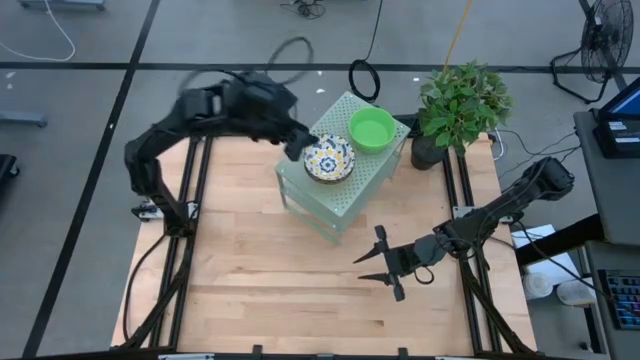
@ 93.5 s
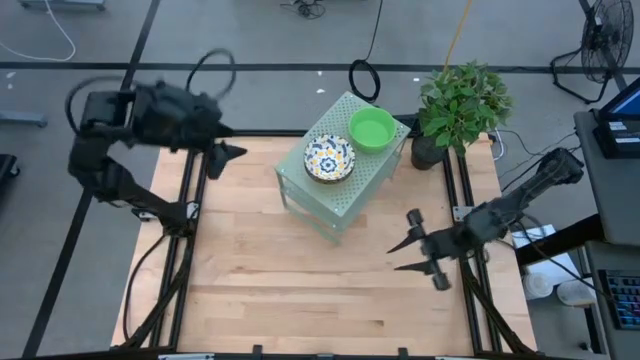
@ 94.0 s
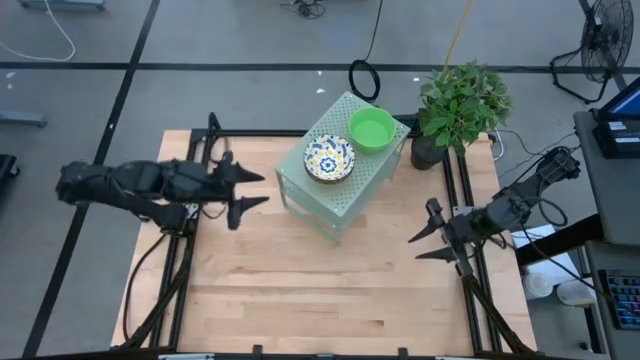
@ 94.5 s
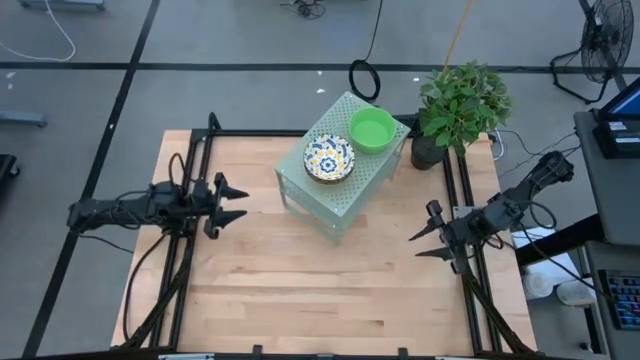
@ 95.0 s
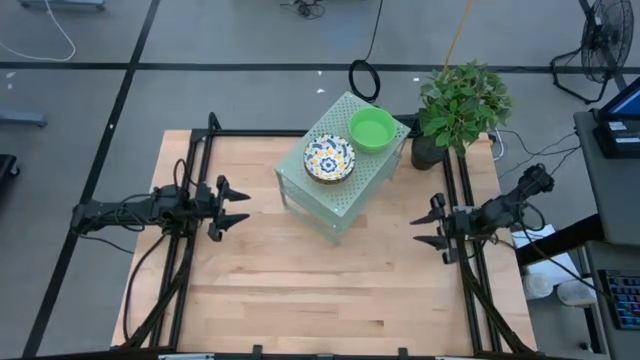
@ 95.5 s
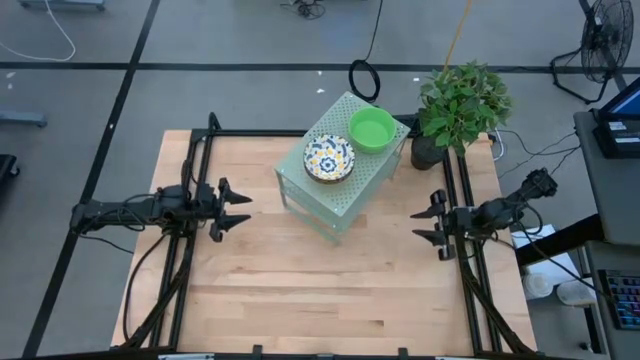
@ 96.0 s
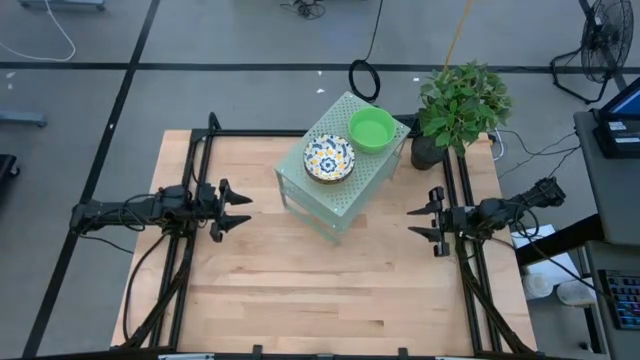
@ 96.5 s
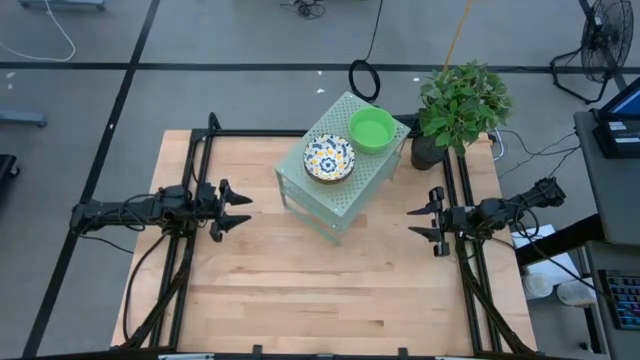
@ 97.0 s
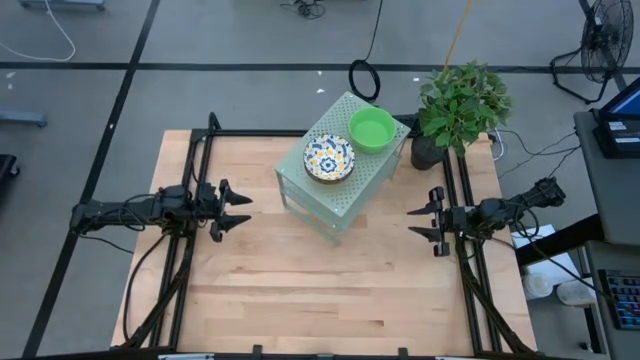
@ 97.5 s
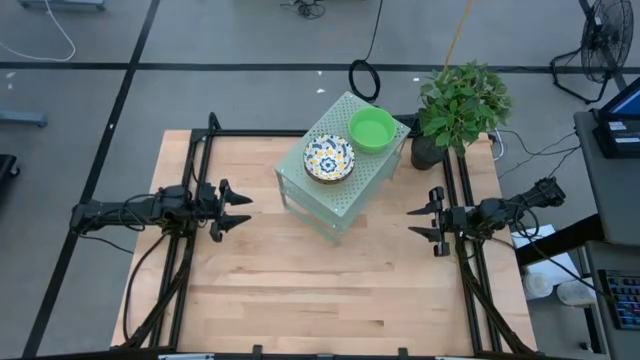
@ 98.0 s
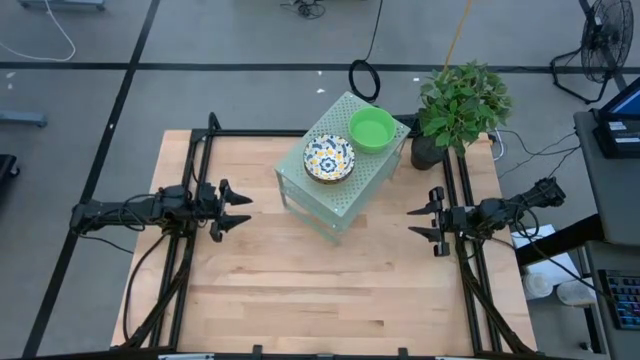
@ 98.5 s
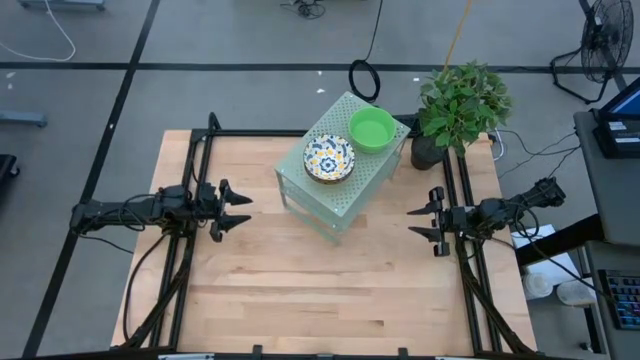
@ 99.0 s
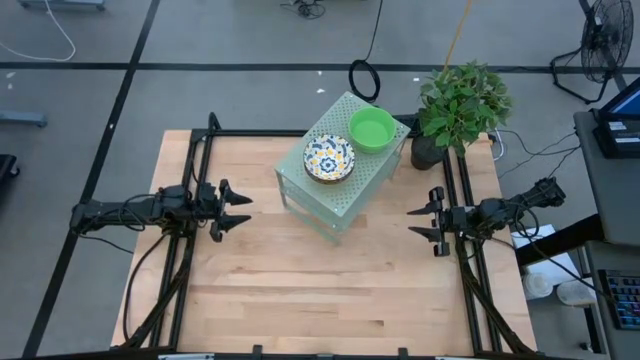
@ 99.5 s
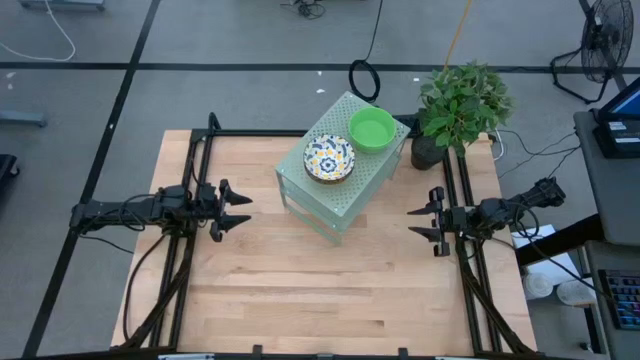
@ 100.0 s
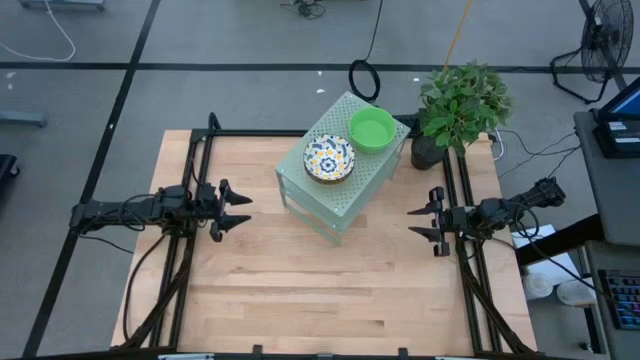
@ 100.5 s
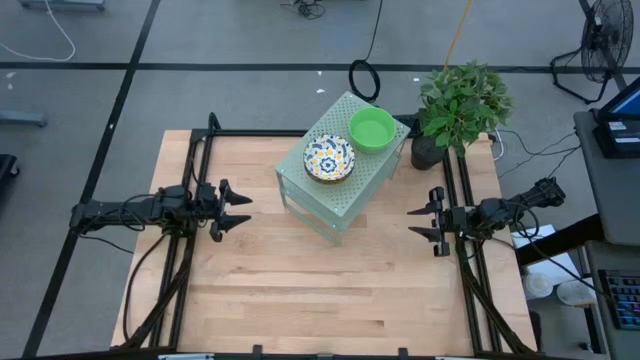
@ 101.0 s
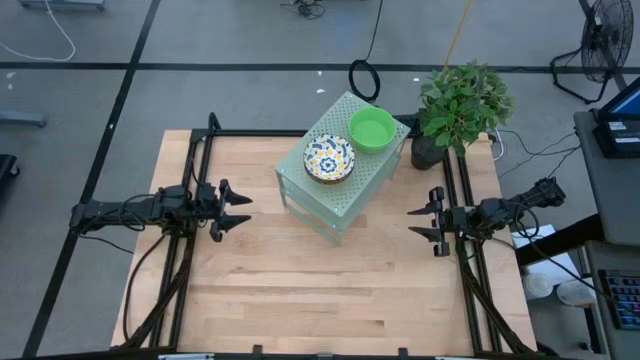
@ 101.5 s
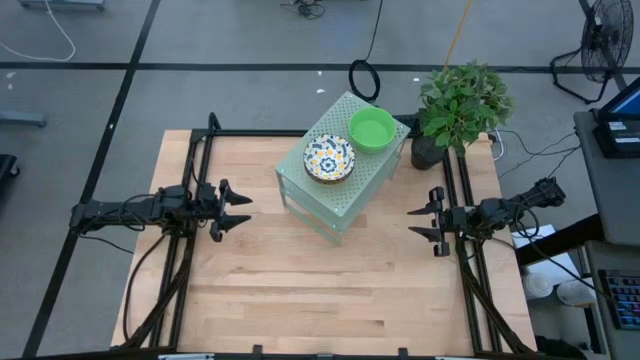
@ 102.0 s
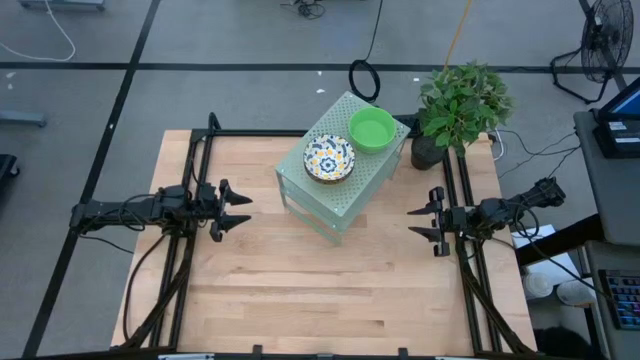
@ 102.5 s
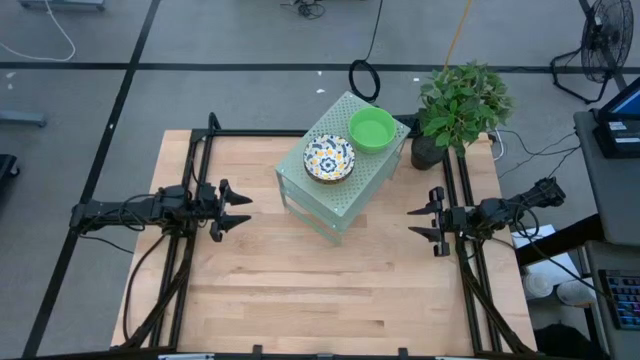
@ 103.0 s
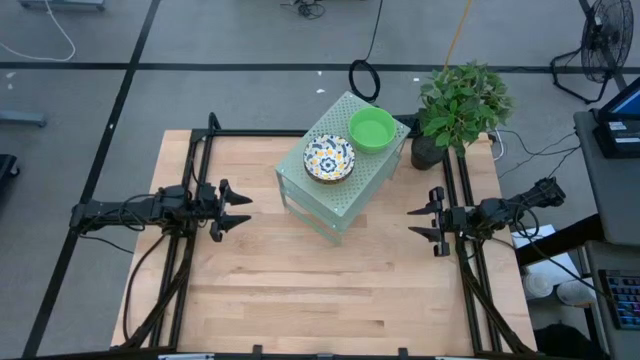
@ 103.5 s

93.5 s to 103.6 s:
Task: Pick & Place Mini bowls
Return to Home Position

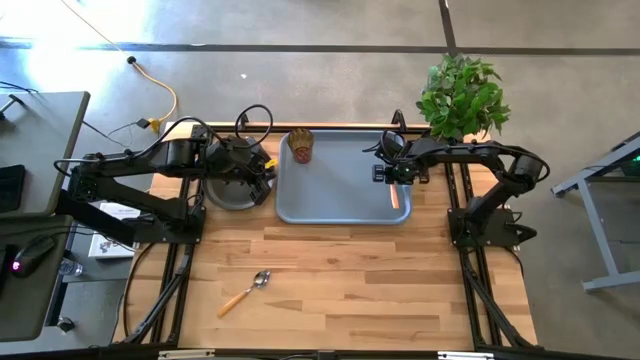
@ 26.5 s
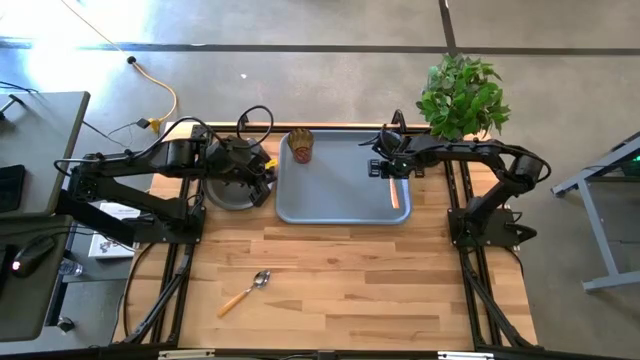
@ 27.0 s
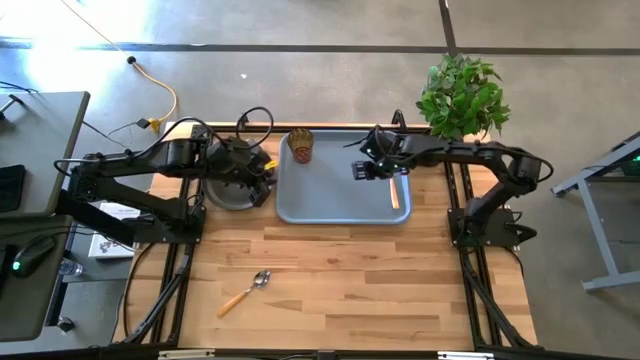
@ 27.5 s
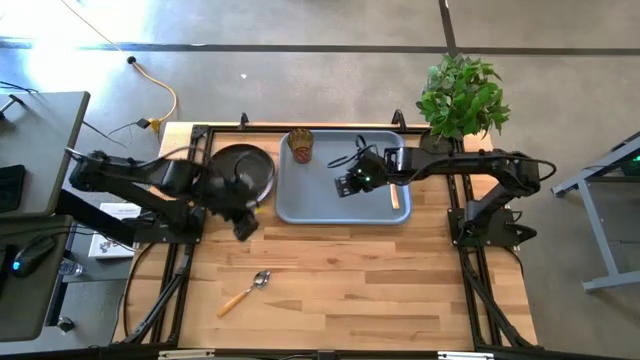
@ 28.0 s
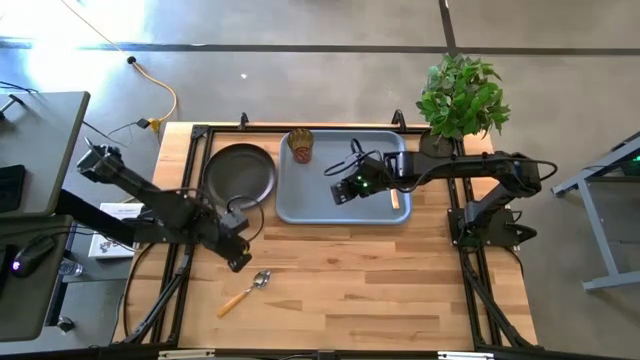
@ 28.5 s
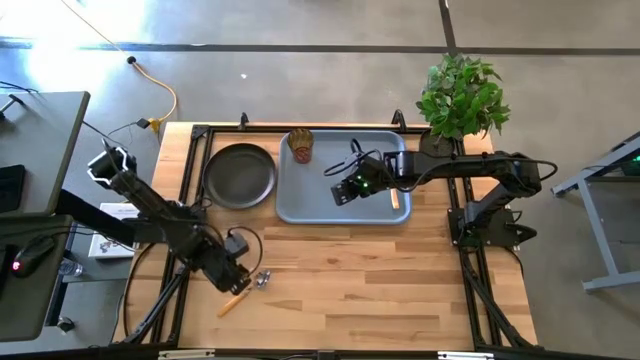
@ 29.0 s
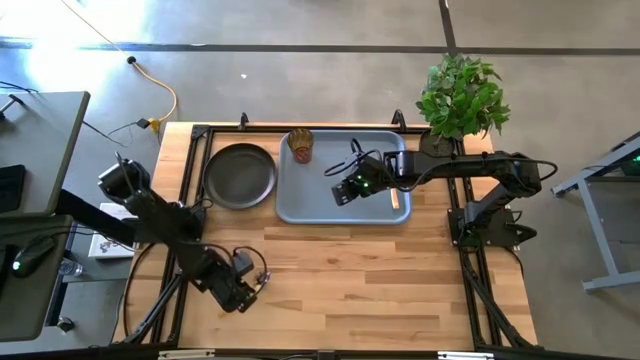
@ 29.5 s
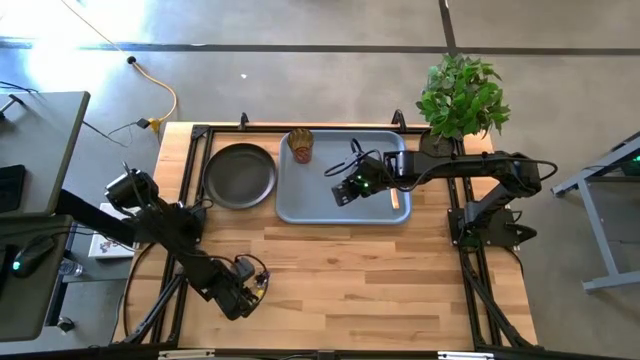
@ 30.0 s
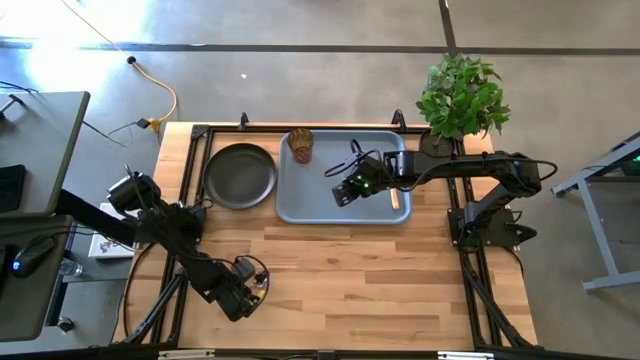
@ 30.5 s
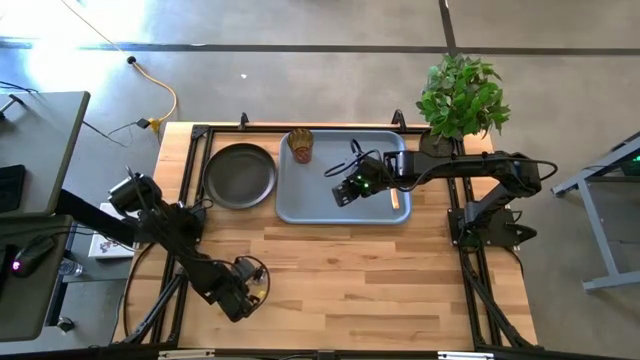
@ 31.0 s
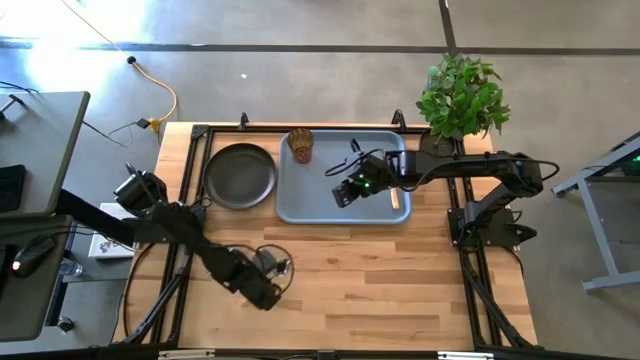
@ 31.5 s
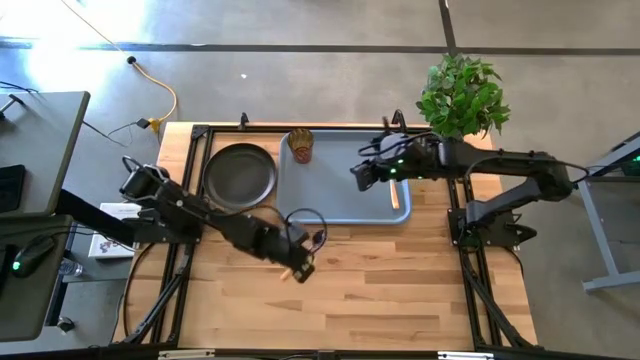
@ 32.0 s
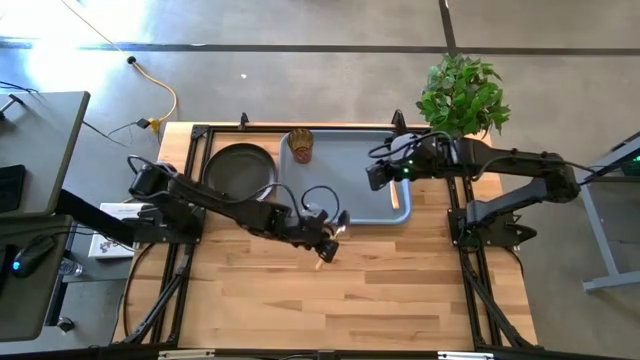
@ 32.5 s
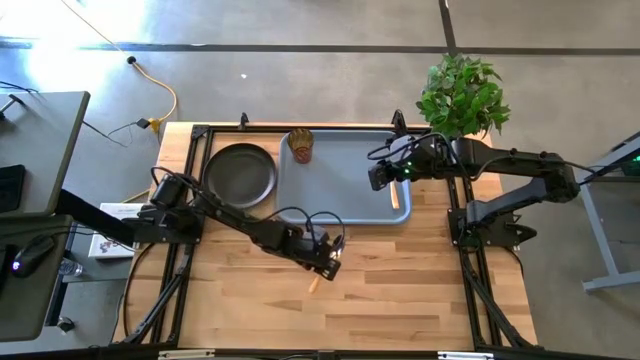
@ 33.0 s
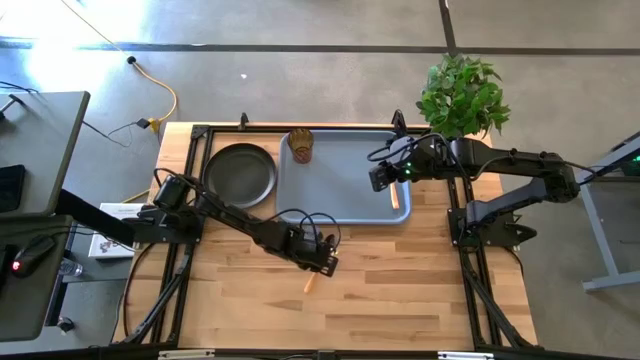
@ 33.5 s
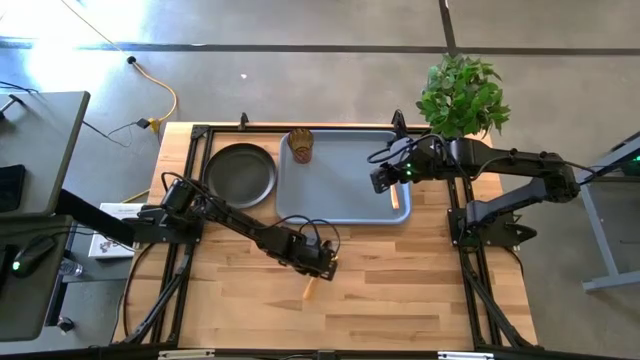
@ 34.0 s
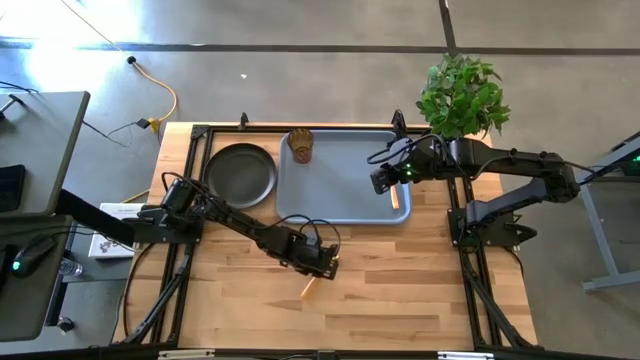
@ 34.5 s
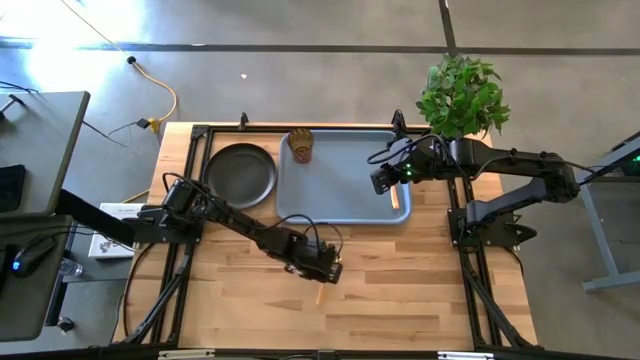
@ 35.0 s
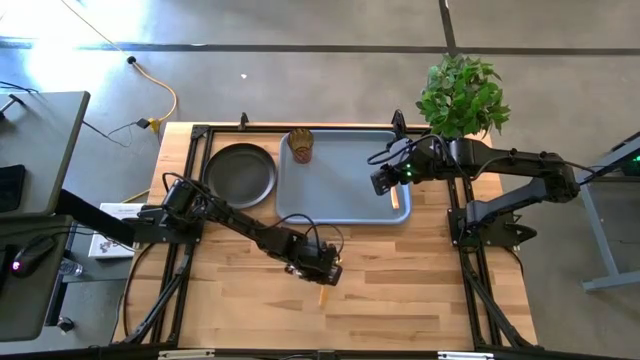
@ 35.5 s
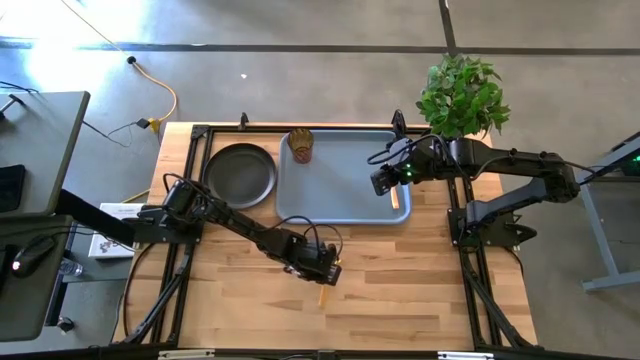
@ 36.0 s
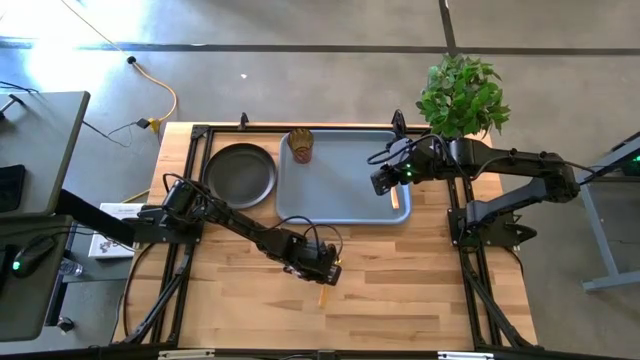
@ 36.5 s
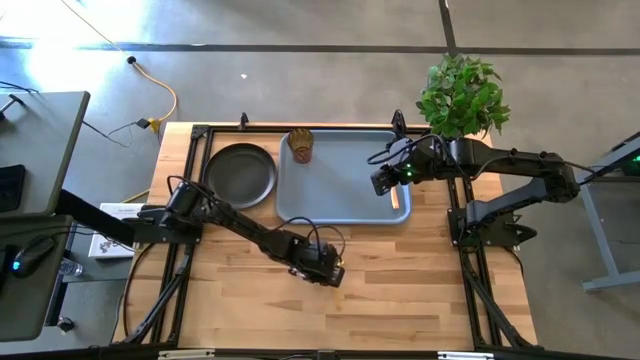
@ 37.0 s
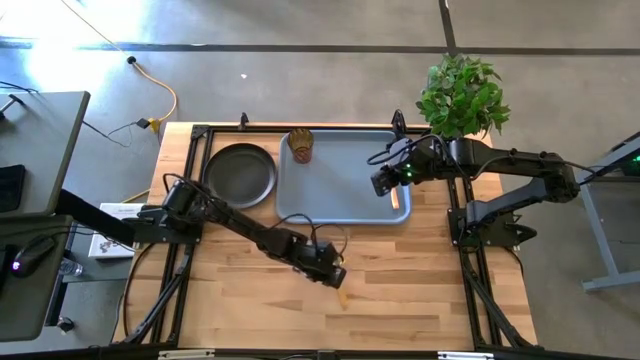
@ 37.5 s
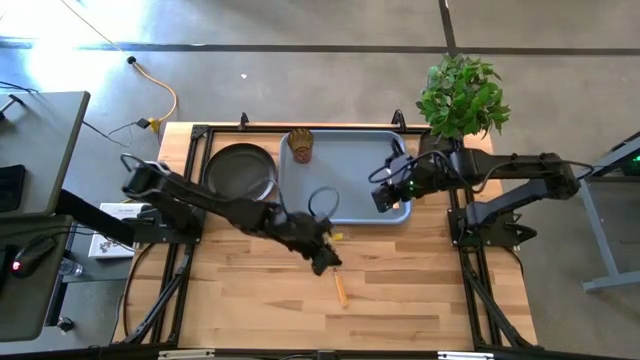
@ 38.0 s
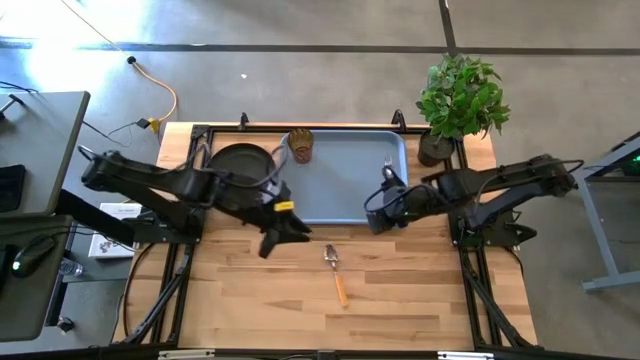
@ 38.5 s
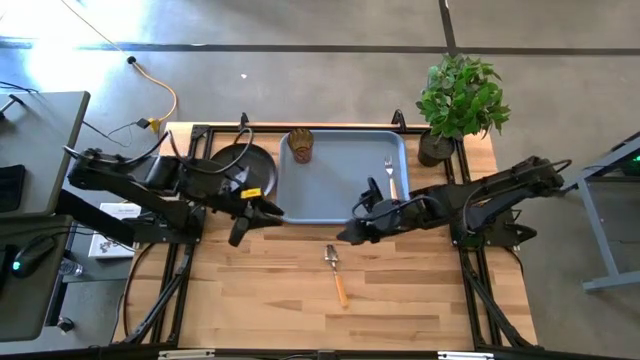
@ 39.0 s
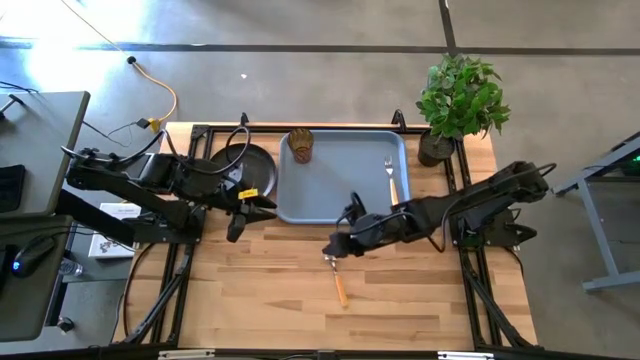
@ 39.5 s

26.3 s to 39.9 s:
Task: Pick and place plate/cup/fork/spoon on tray
Put the orange spoon on the gray serving tray
